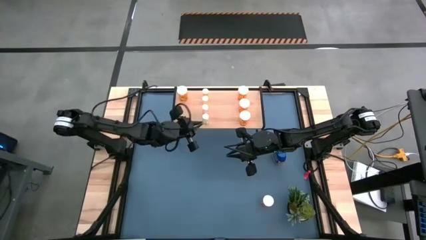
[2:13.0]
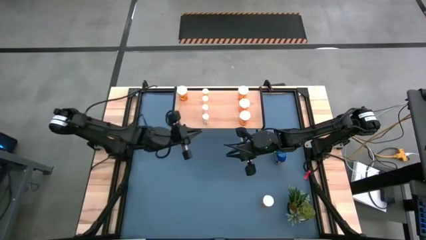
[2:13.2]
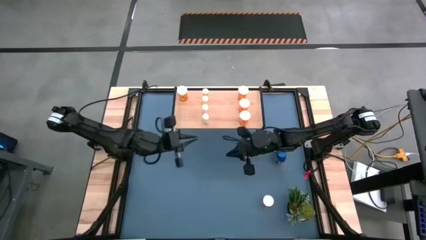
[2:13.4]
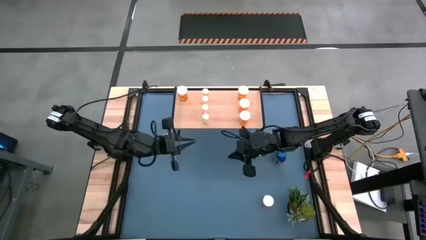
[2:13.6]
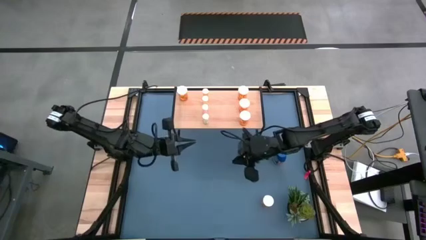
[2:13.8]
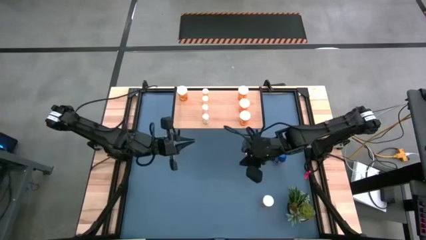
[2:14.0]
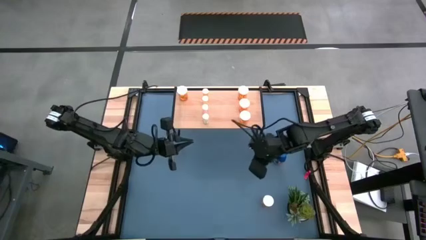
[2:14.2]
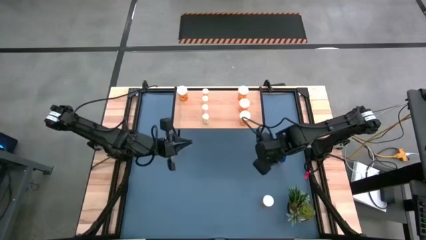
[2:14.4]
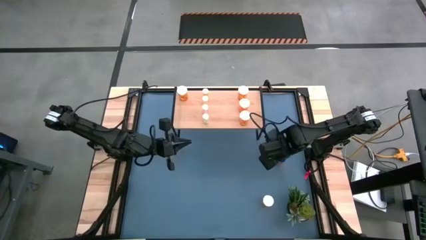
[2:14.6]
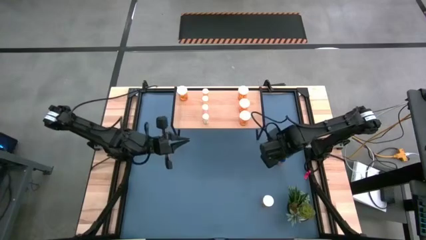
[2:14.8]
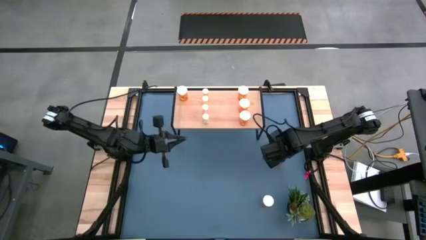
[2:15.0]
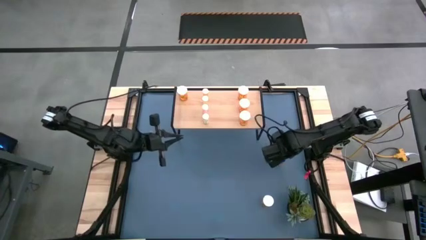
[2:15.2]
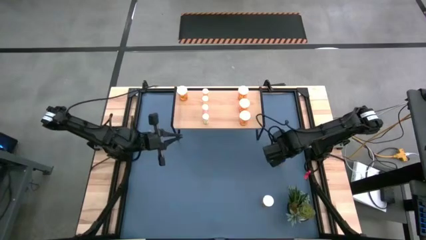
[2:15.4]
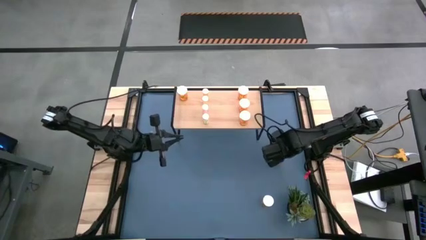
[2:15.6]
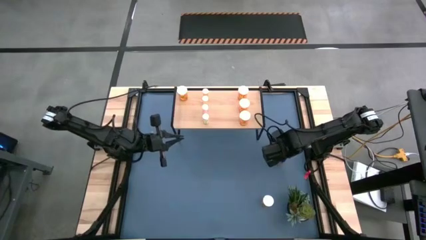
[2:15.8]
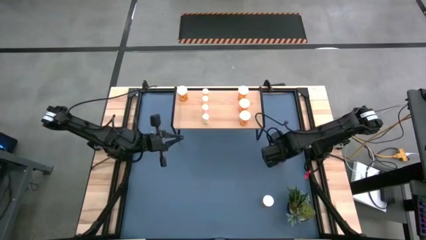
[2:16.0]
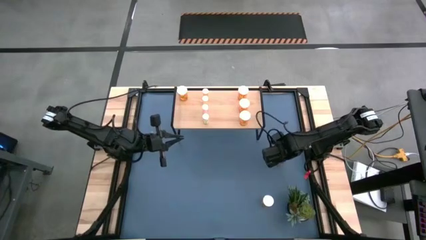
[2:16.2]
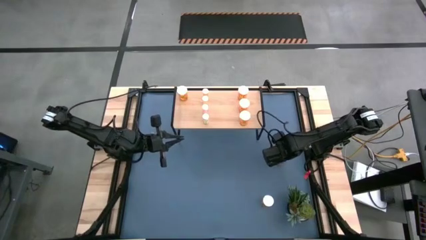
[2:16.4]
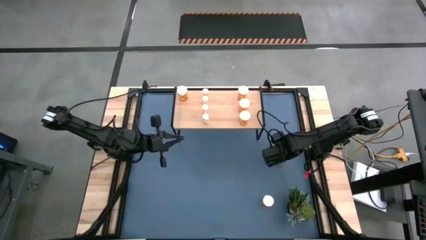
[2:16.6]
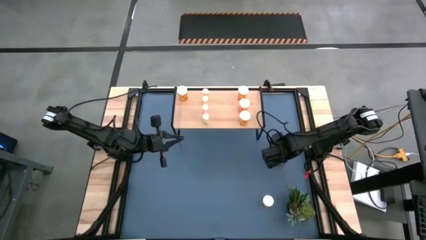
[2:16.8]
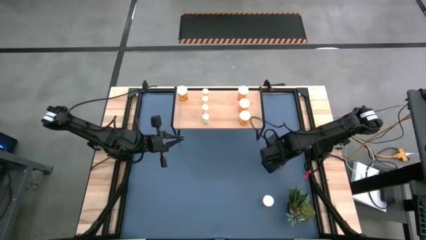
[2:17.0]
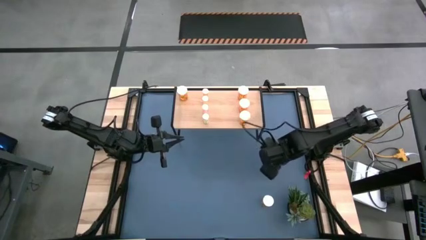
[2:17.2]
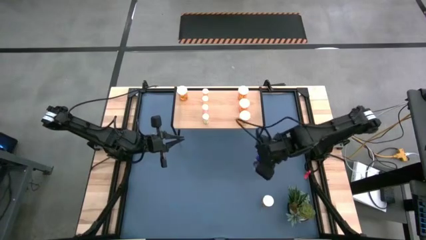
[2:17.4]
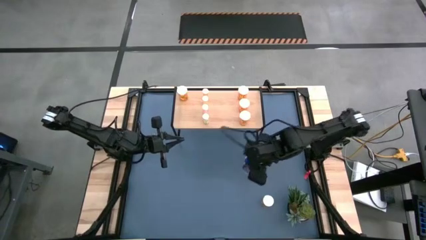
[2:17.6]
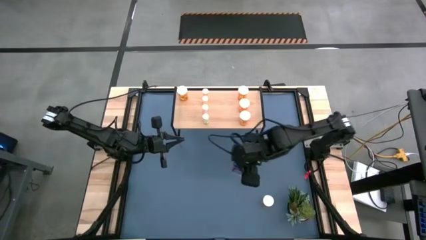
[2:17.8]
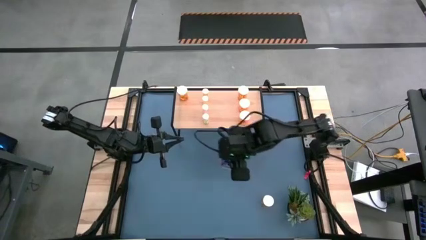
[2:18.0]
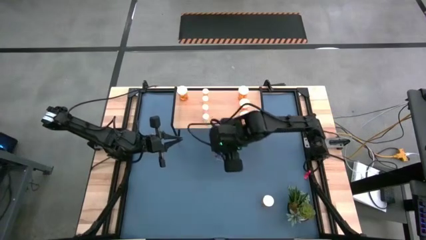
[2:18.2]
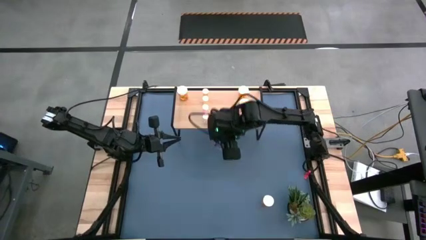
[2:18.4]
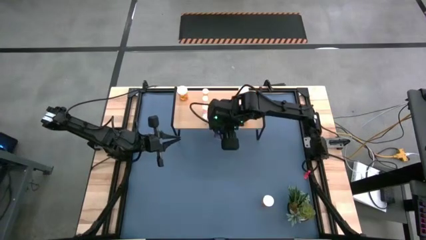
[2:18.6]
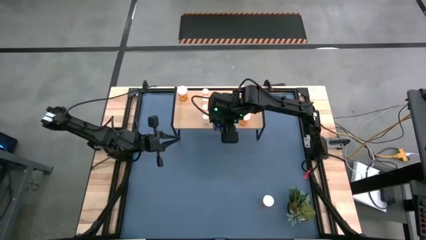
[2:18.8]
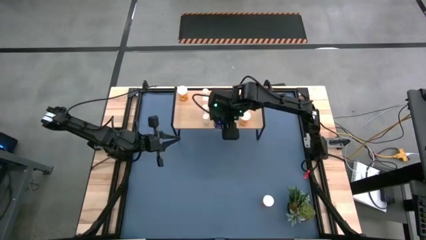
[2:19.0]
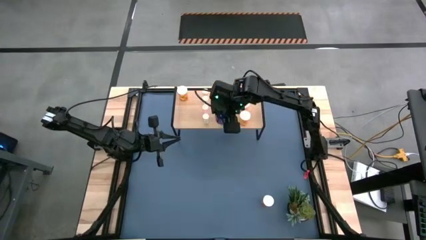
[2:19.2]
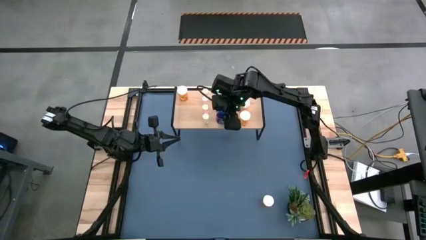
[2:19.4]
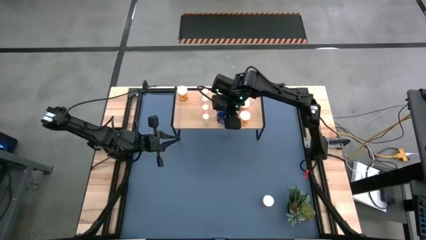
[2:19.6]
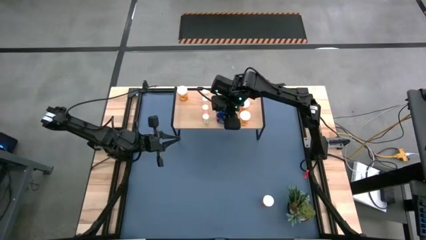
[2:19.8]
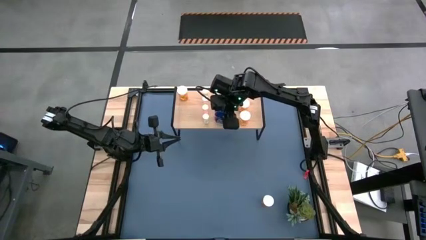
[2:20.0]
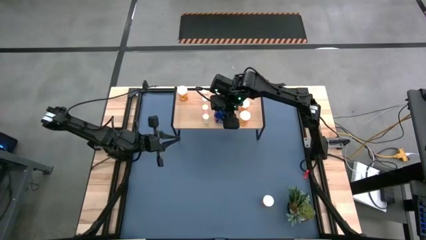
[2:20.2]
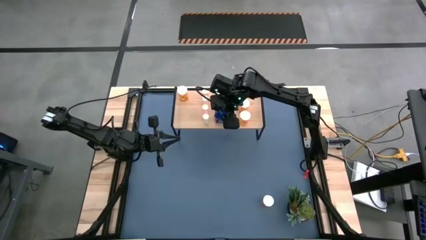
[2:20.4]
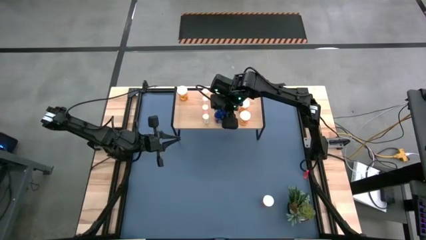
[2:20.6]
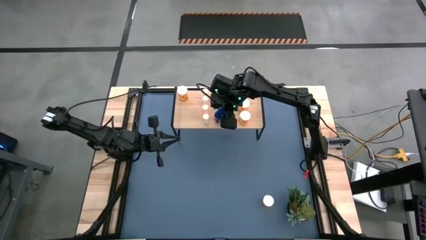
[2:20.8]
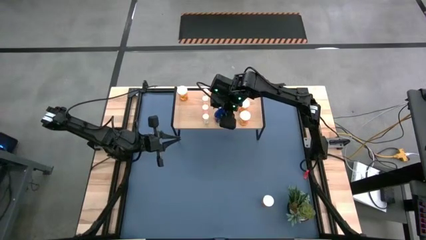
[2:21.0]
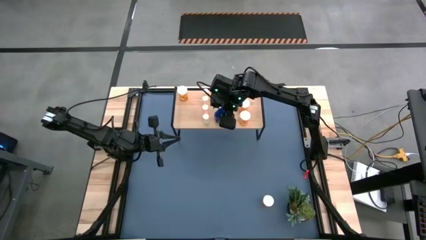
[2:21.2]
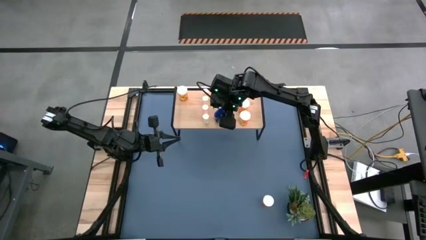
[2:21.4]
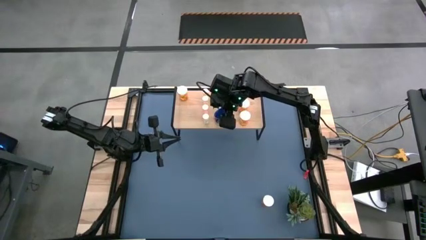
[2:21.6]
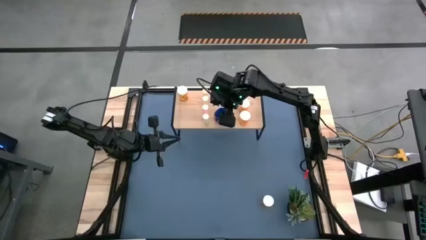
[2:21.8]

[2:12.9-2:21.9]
Task: Pick and place medicine bottles onto shelf by color
Put the blue pill bottle on the shelf

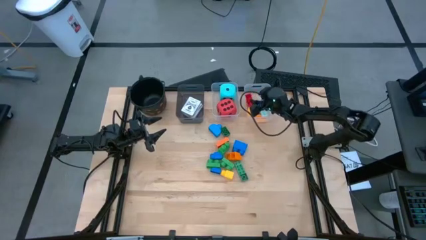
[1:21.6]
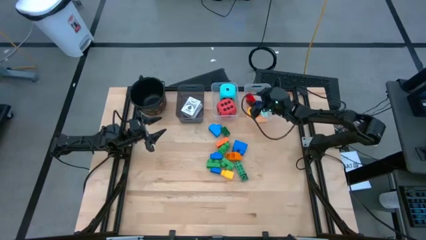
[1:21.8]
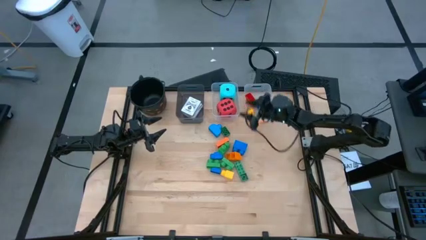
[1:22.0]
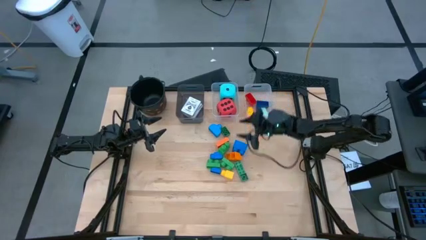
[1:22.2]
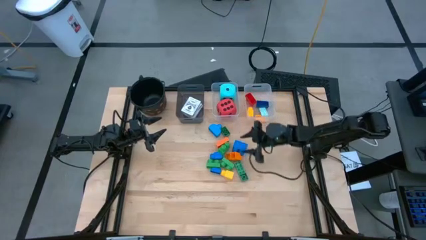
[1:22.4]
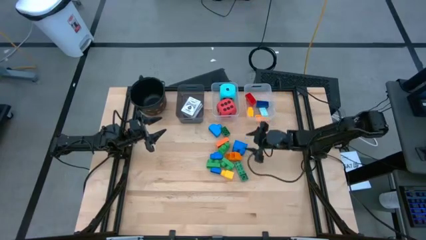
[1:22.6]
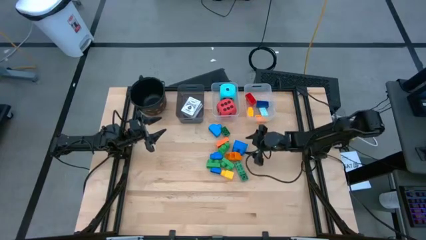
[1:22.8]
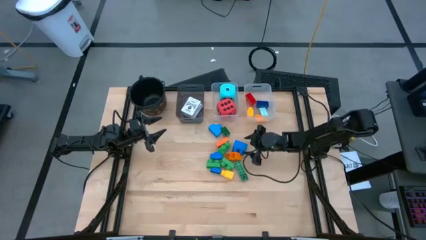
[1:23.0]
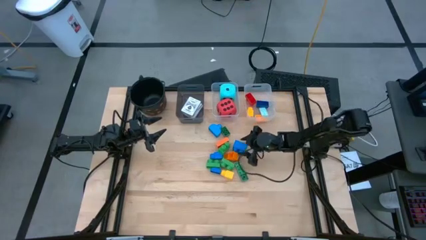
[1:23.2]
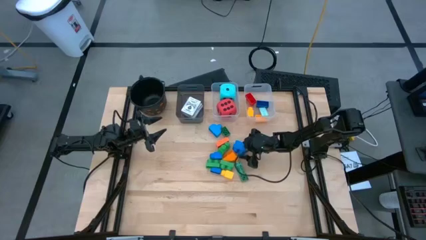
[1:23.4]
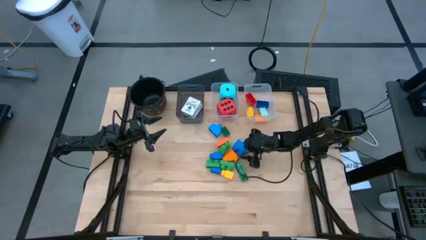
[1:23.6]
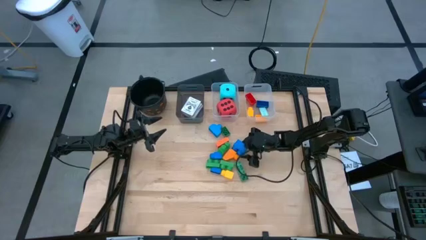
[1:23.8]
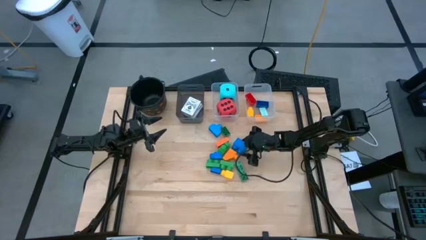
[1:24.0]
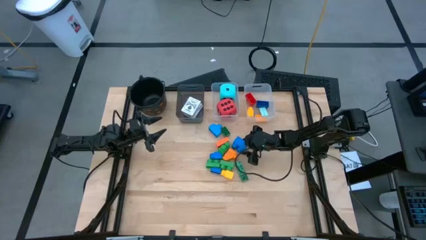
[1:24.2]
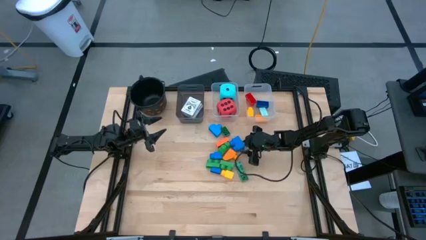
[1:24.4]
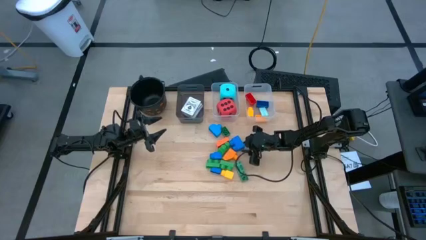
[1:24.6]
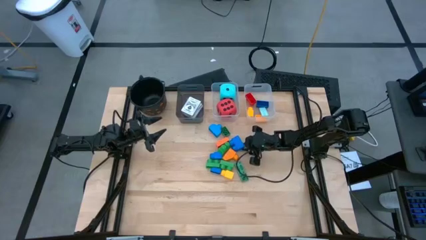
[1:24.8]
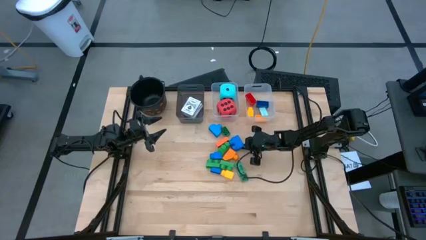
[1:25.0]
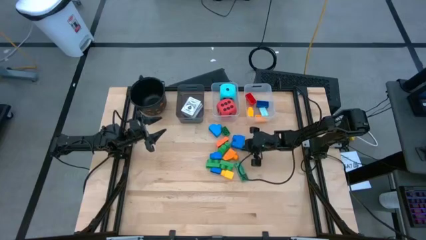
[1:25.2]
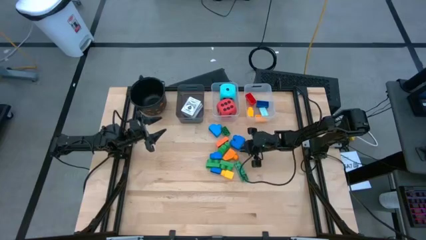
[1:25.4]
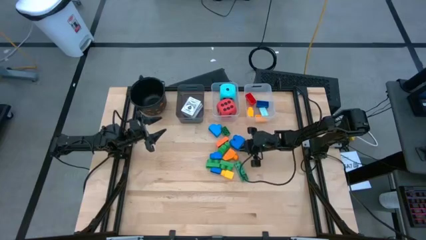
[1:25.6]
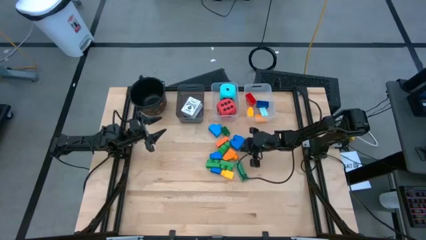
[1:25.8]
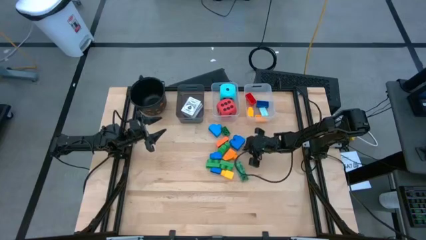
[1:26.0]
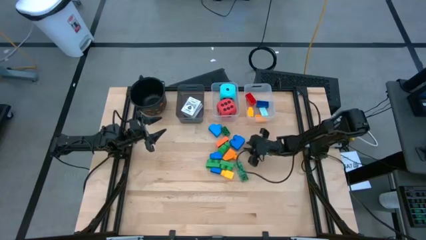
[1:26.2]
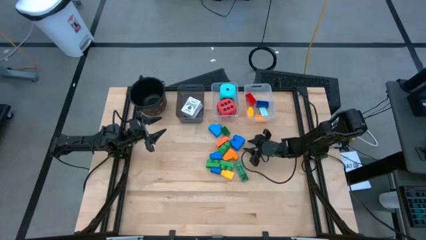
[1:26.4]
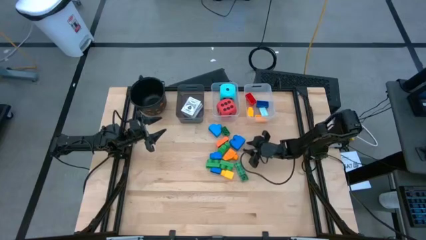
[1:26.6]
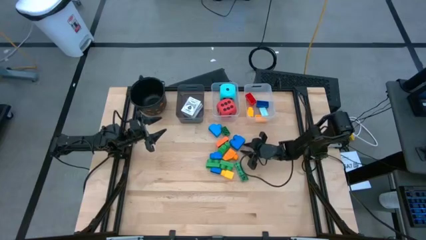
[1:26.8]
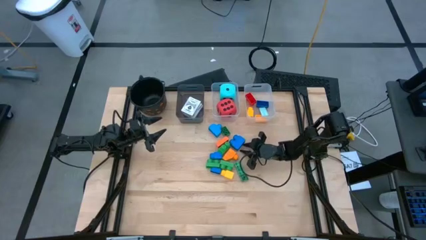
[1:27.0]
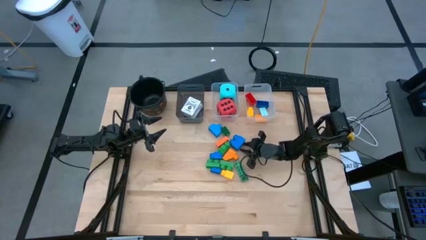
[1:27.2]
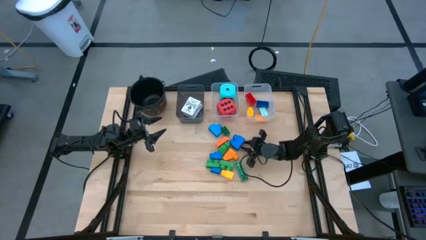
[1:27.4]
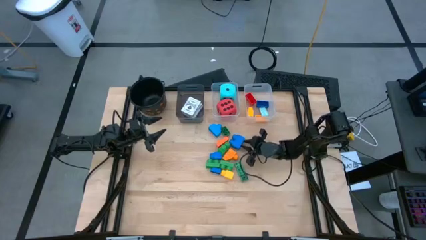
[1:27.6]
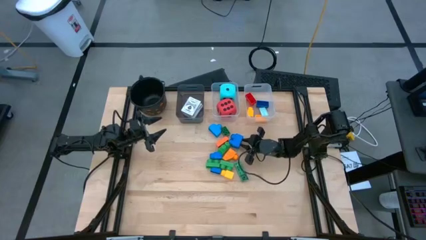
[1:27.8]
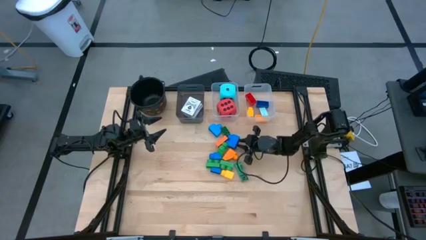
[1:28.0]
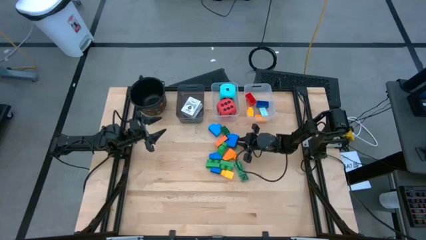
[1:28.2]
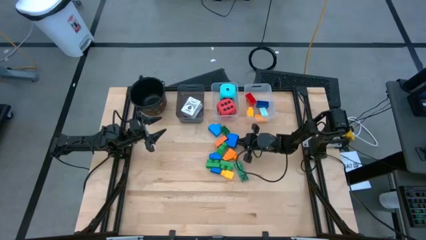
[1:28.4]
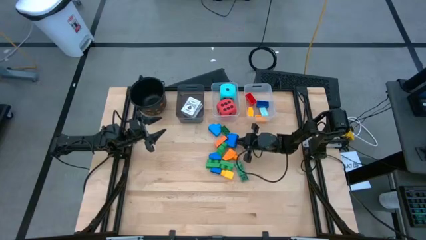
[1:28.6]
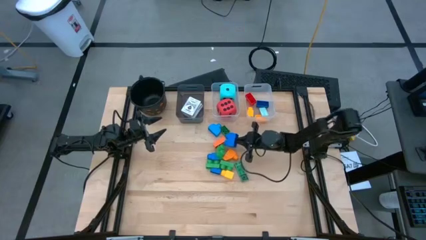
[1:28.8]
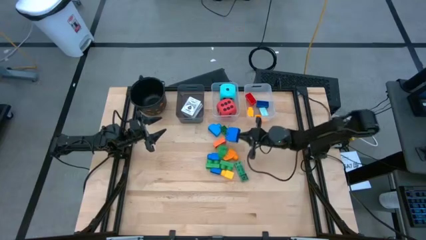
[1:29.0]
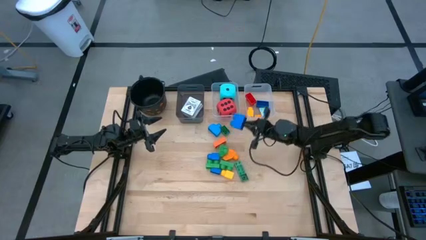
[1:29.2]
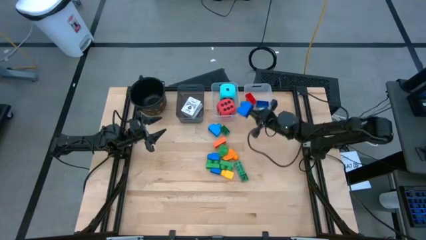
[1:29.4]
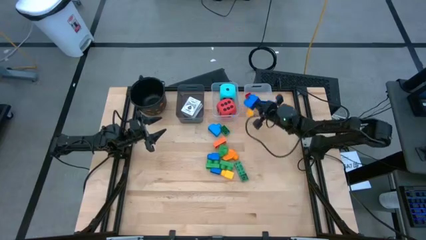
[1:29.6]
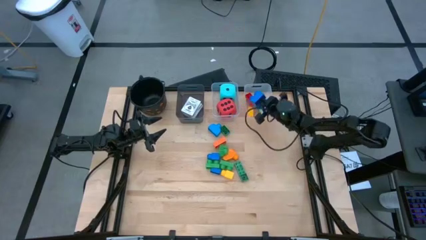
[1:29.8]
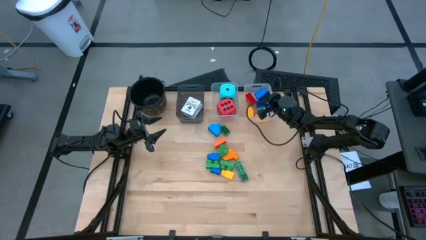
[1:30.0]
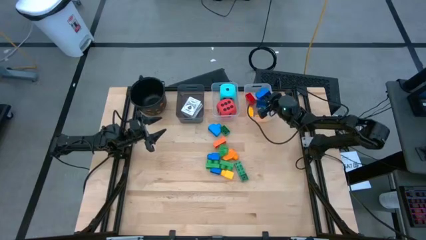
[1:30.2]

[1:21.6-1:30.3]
Task: Pick & Place Toys
Put the blue two stud game piece into the right transparent bin
